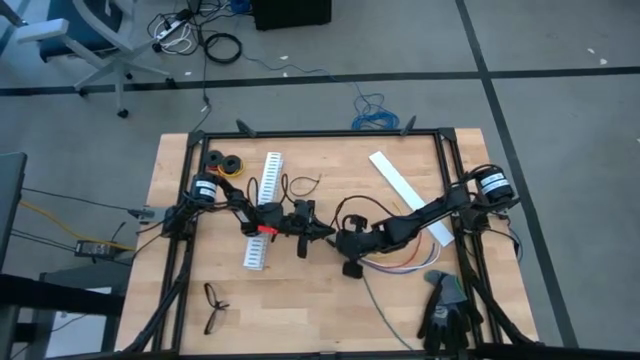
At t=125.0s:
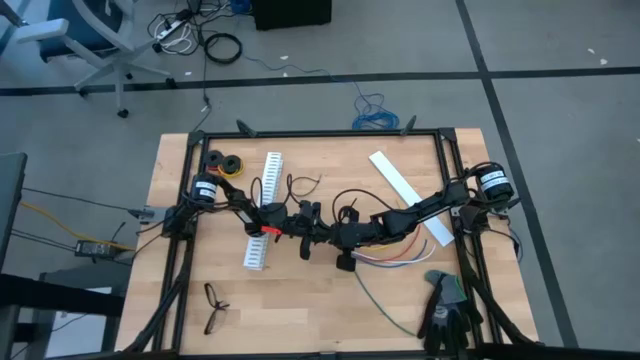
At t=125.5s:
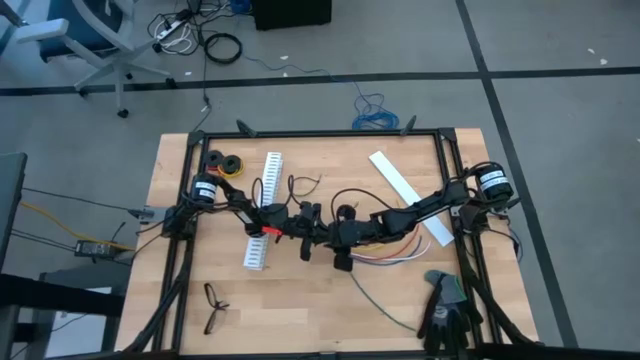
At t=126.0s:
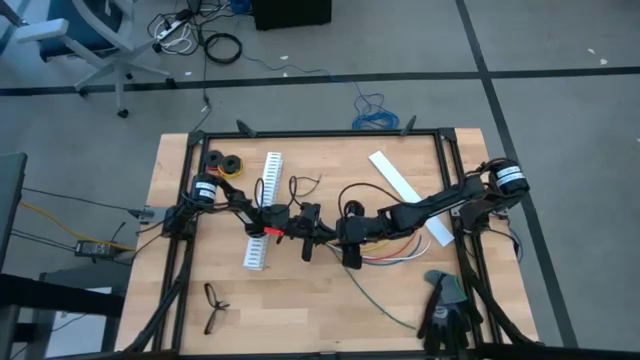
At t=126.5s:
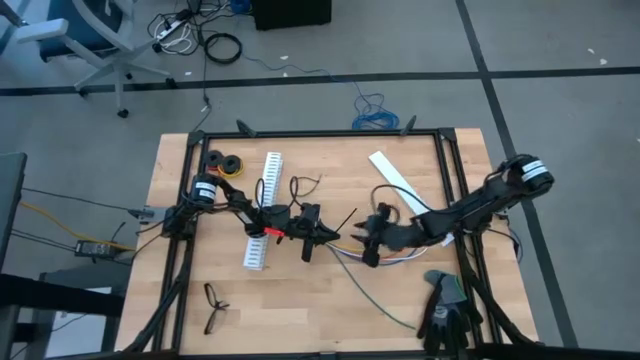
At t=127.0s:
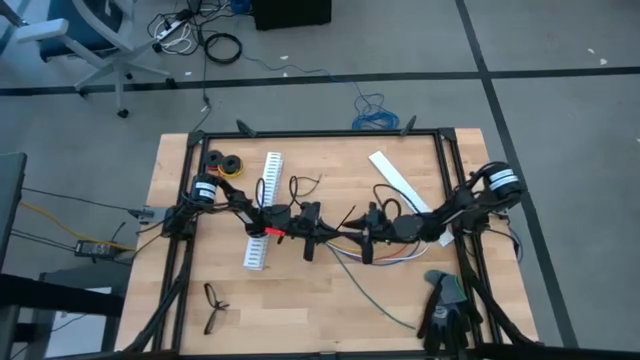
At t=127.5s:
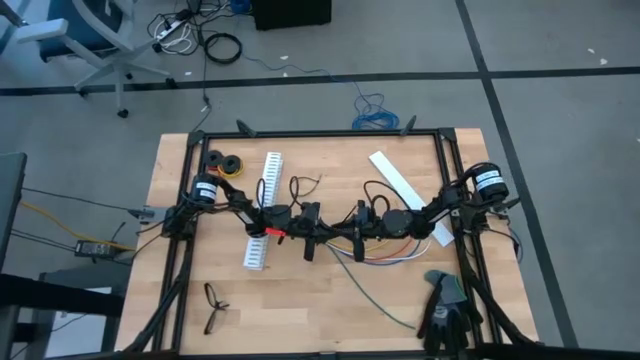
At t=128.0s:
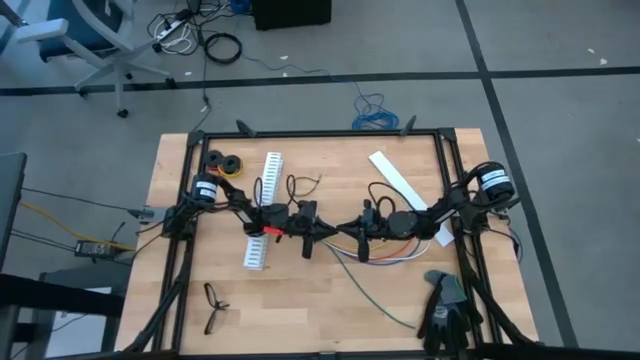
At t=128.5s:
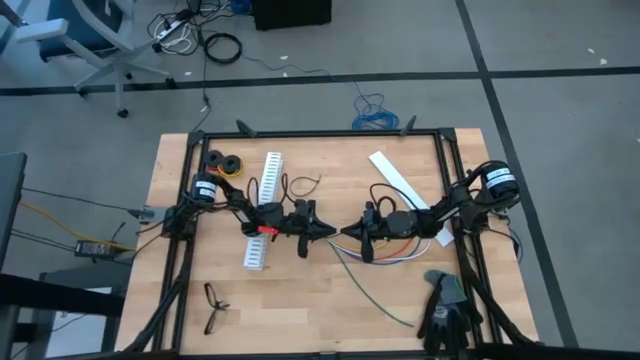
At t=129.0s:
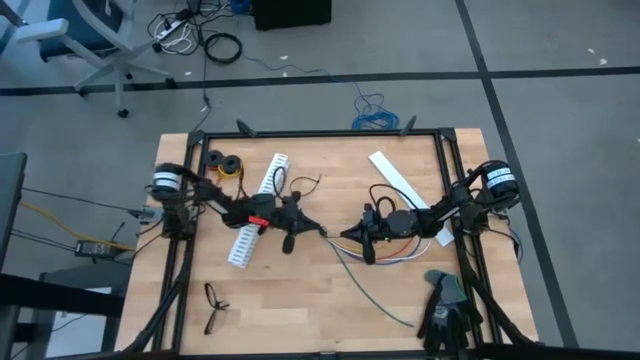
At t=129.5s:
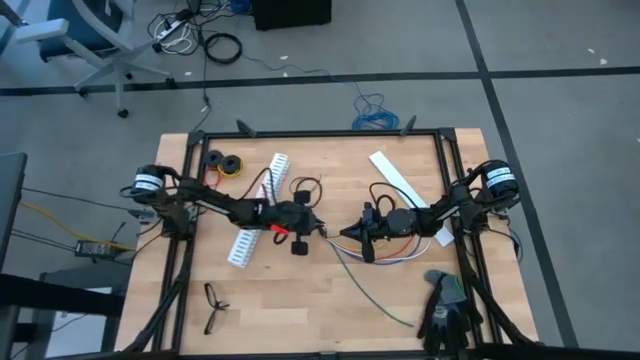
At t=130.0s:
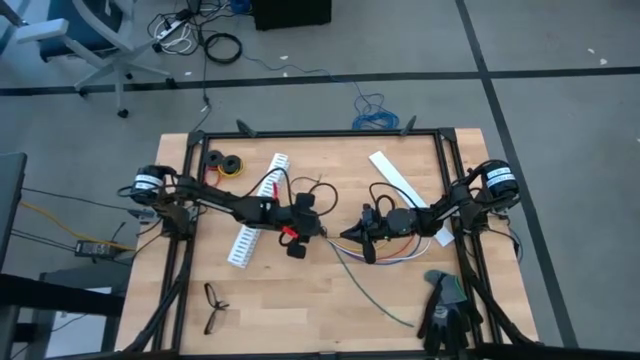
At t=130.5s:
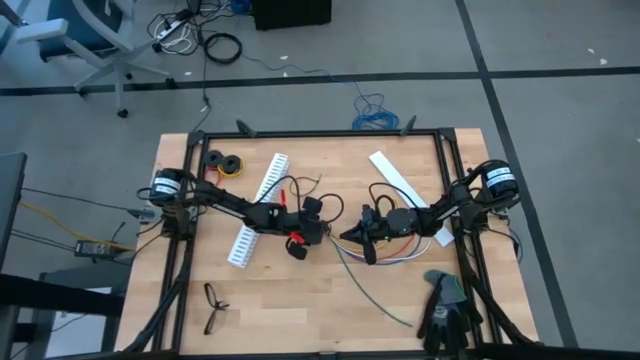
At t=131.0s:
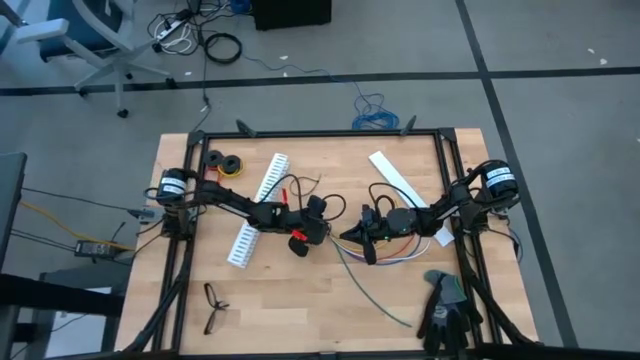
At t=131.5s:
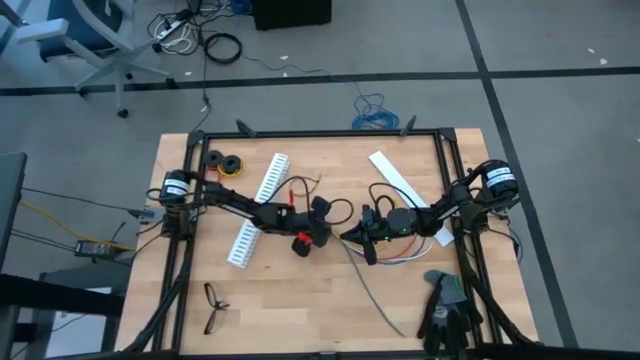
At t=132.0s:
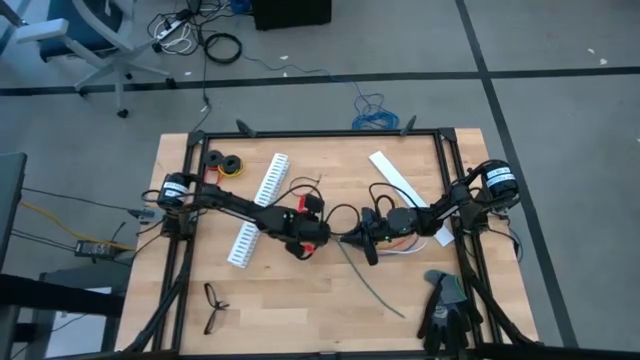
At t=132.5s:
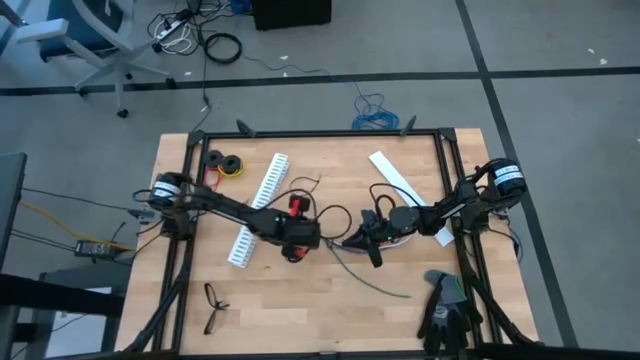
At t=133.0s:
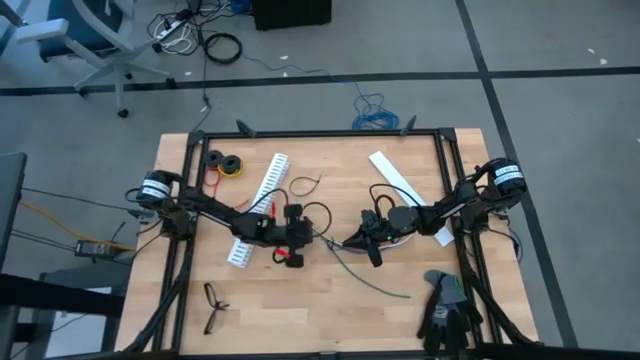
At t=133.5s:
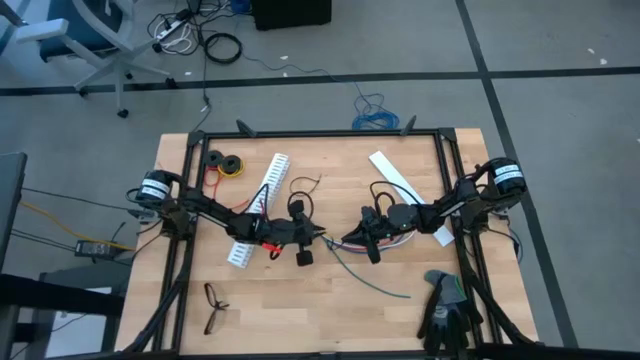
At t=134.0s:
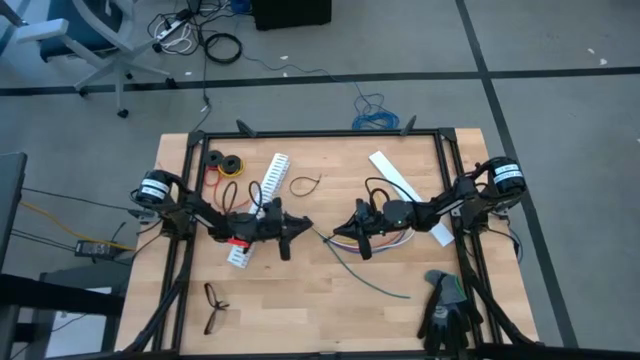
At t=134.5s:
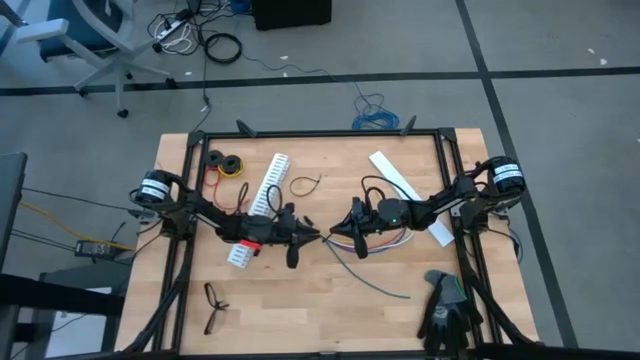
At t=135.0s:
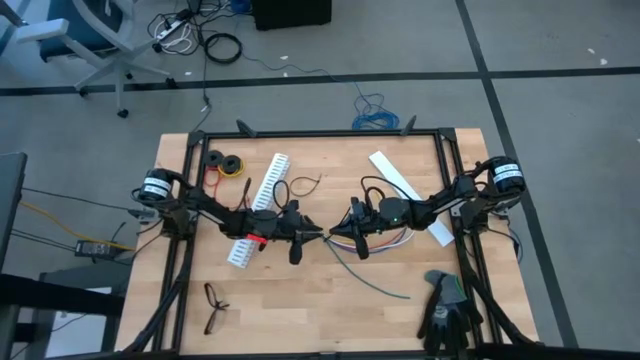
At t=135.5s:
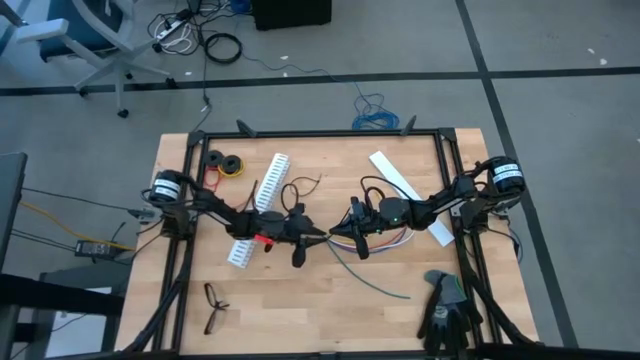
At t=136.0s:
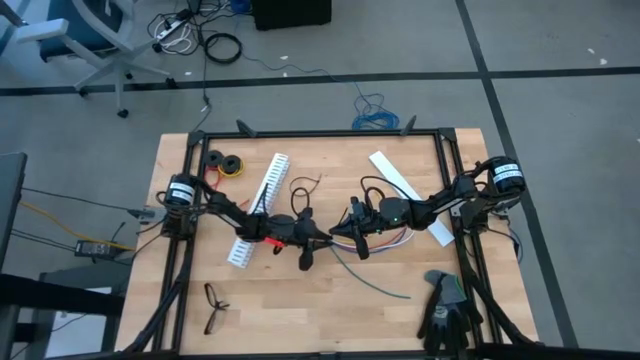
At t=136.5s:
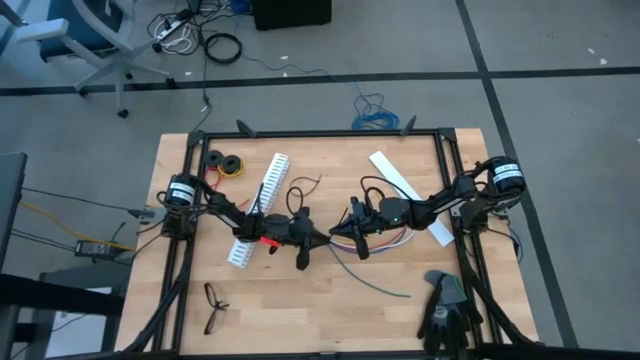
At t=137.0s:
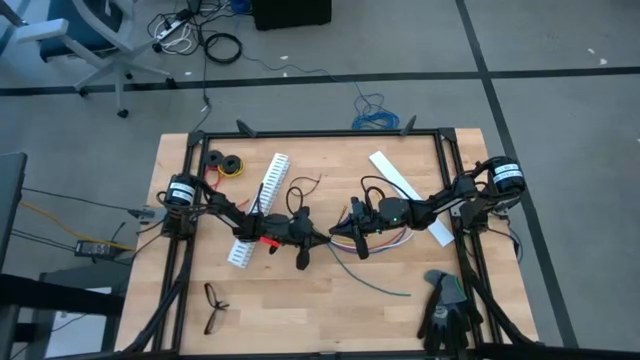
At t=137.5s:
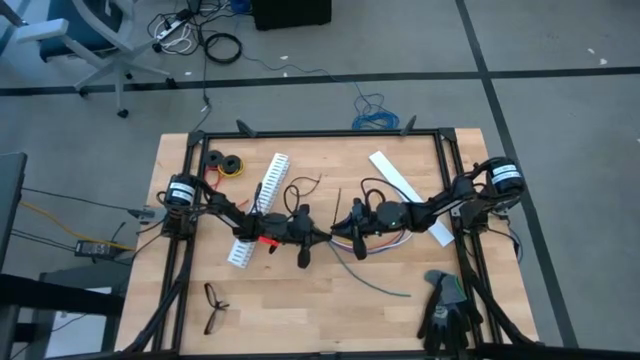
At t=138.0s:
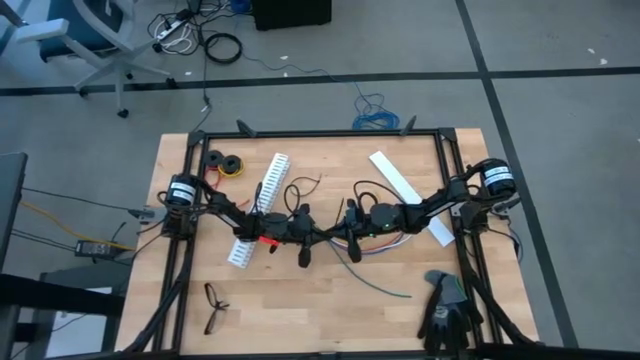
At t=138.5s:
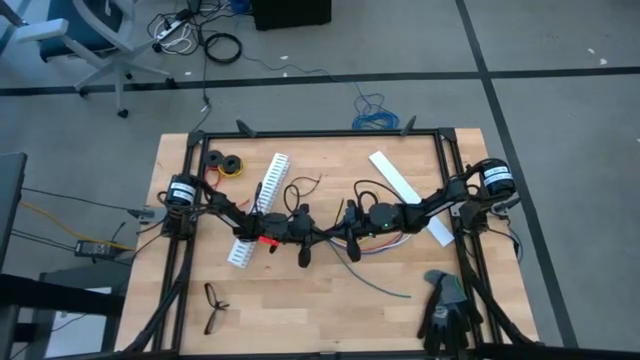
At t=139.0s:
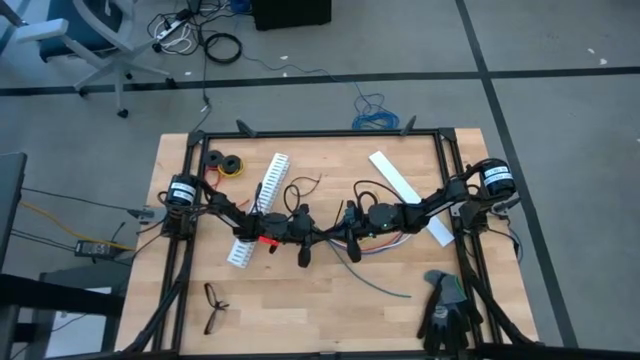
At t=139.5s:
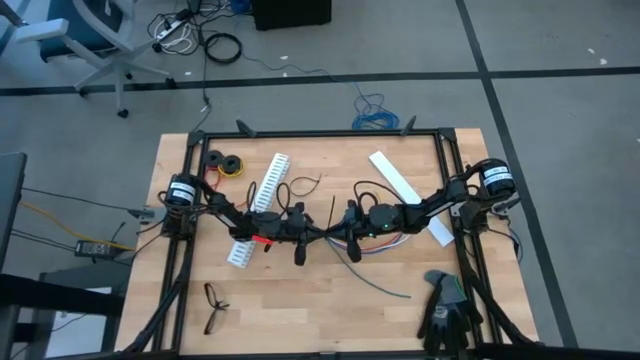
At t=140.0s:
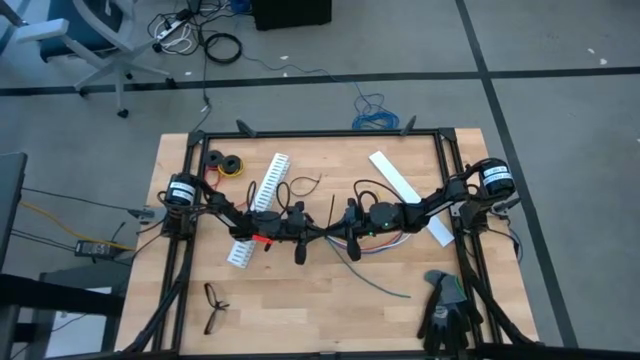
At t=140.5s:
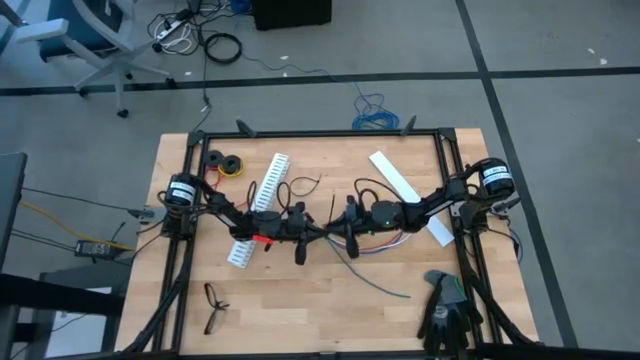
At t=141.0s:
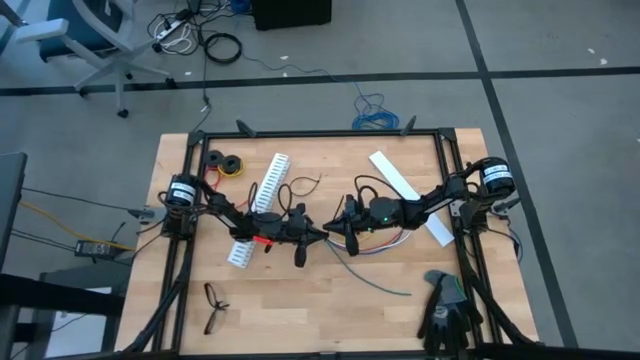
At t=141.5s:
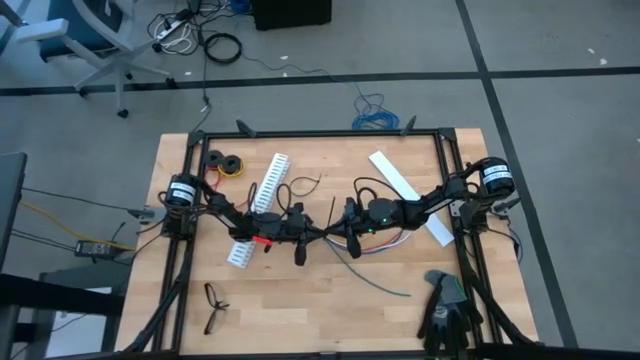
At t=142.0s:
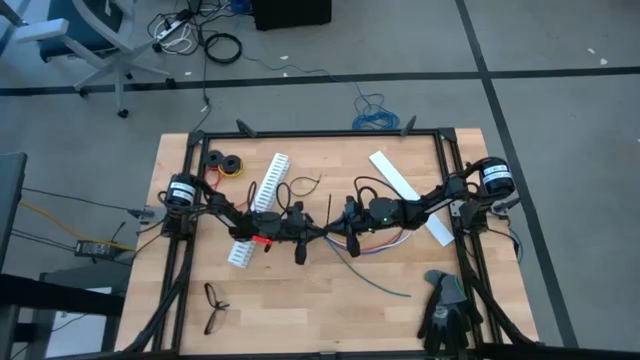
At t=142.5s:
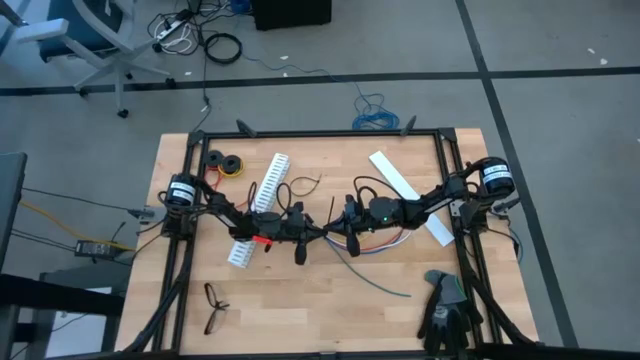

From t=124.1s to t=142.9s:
Task: Ziptie cables
Wrap the cable wires with the black zip tie

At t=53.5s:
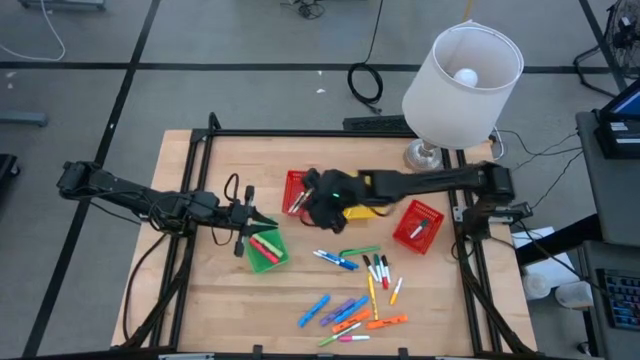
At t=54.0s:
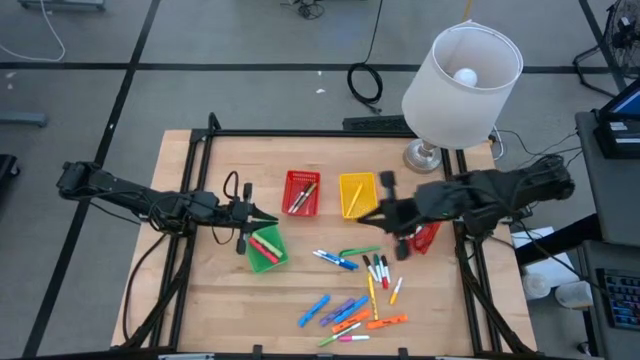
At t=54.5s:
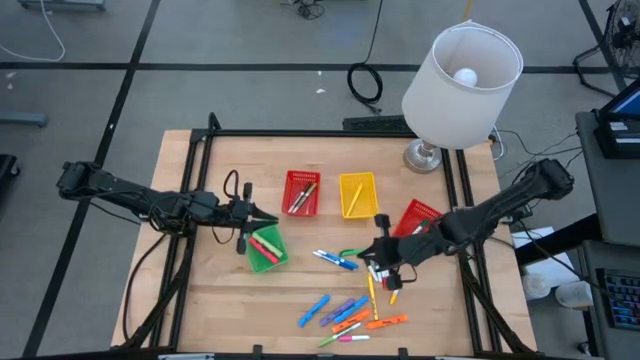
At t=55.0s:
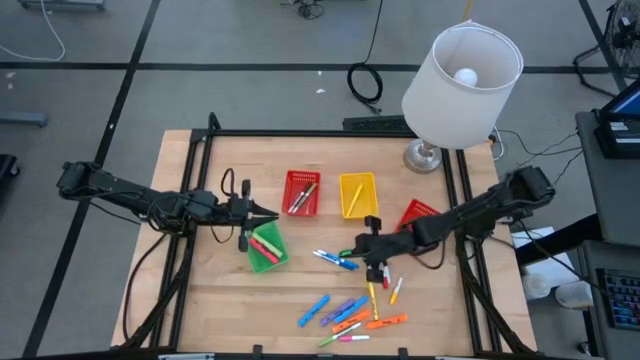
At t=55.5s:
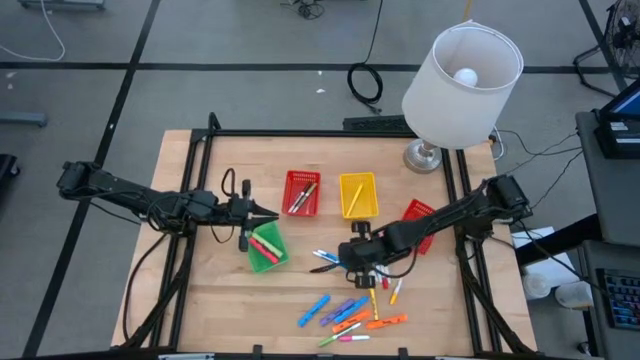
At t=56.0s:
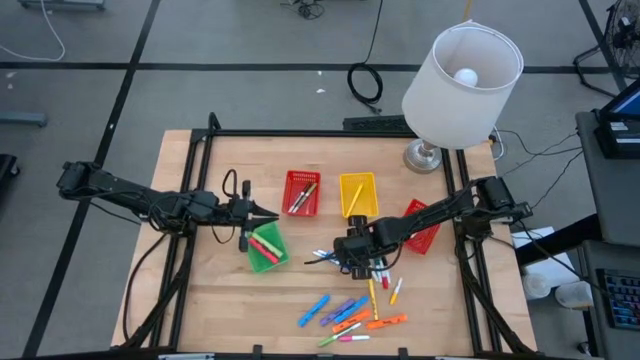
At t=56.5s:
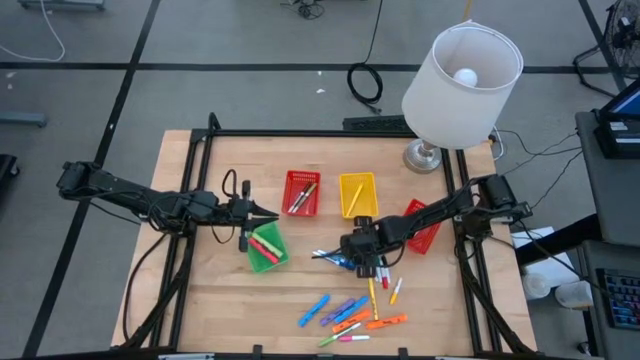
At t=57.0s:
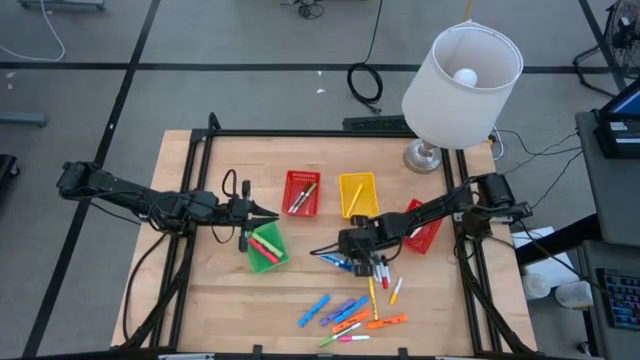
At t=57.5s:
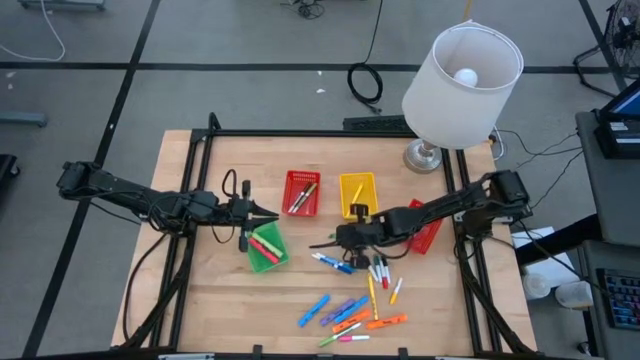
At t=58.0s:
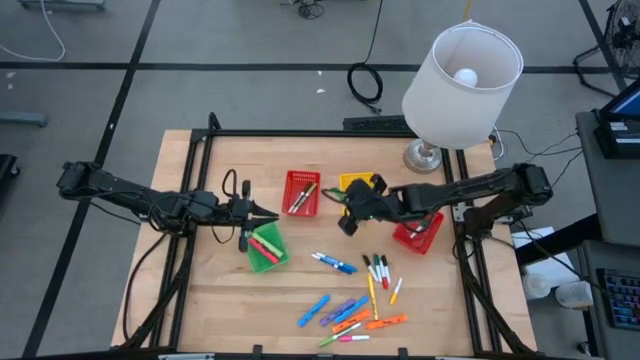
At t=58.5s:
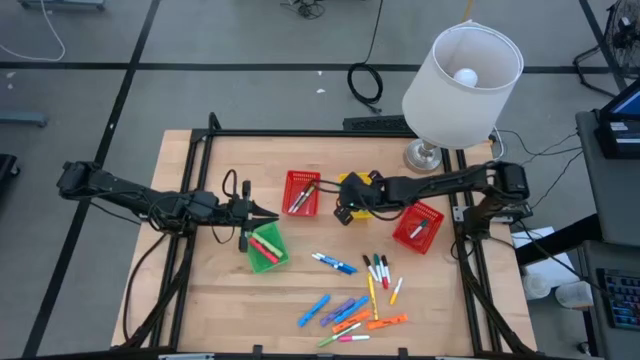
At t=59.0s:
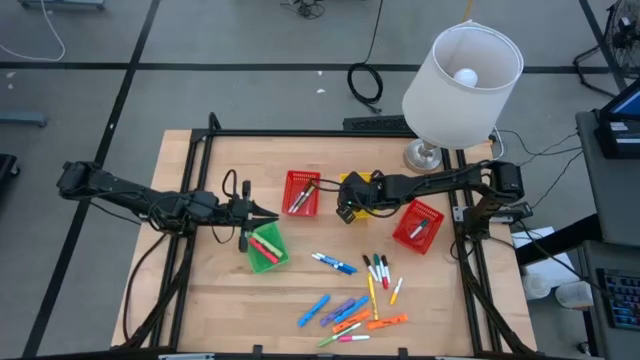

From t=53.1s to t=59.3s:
Task: Pick & Place Markers
Put the green pen into the yellow bin
